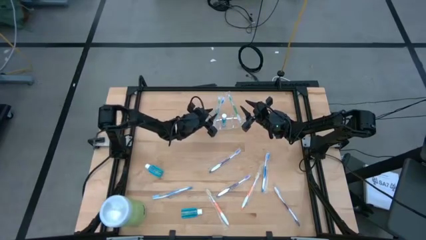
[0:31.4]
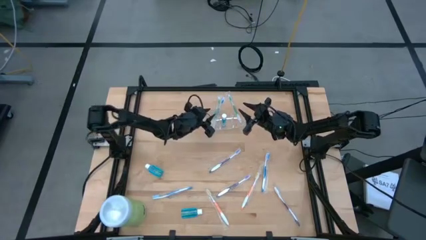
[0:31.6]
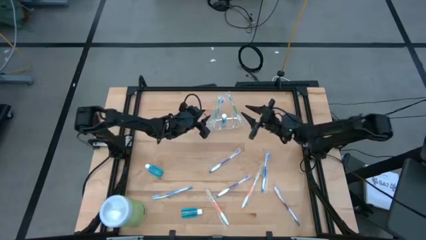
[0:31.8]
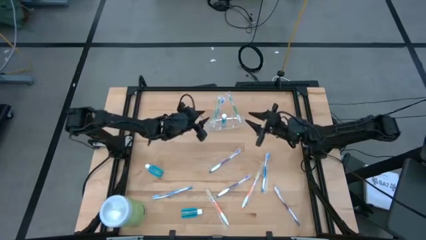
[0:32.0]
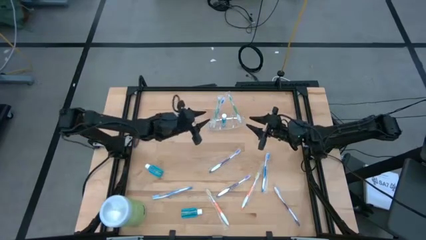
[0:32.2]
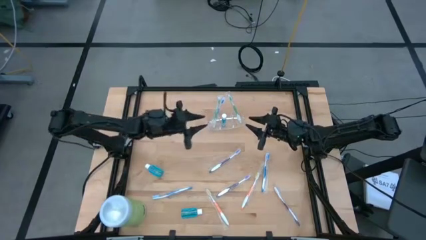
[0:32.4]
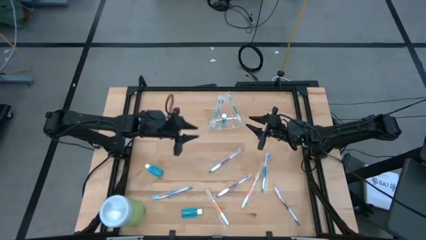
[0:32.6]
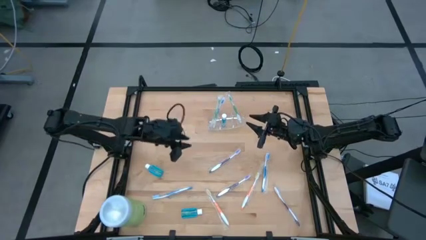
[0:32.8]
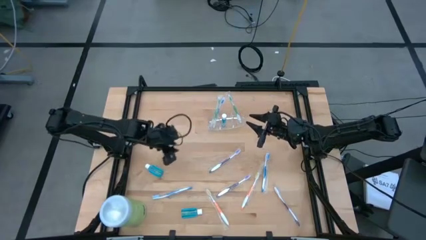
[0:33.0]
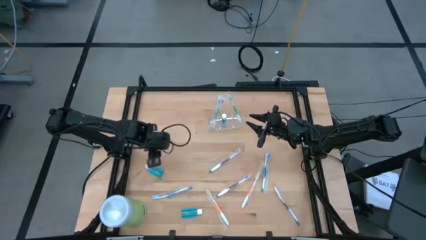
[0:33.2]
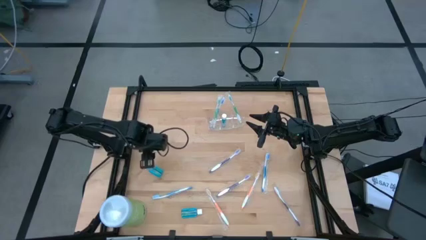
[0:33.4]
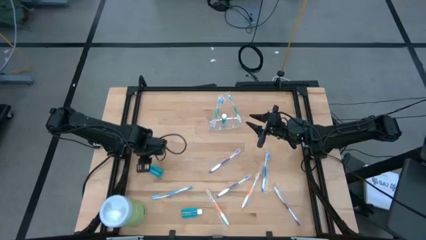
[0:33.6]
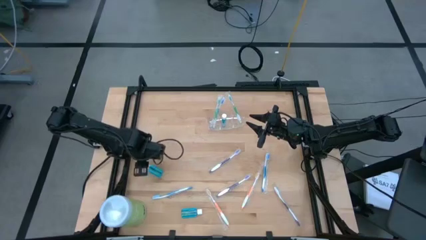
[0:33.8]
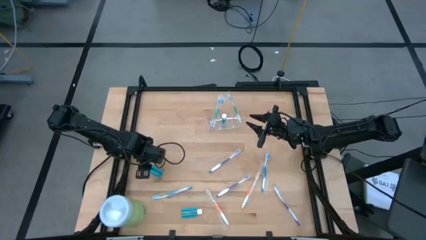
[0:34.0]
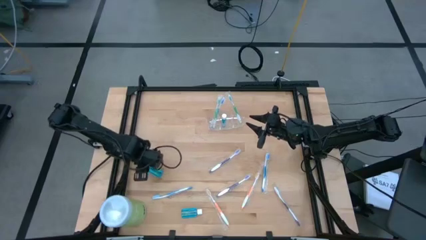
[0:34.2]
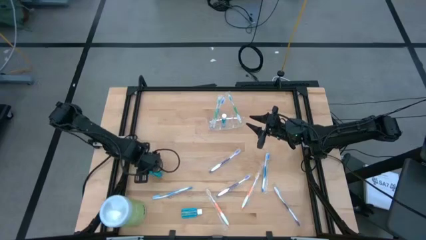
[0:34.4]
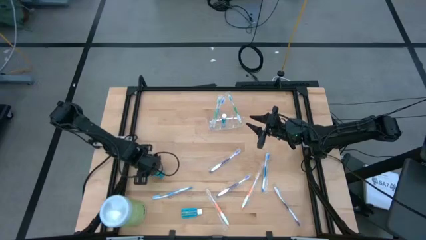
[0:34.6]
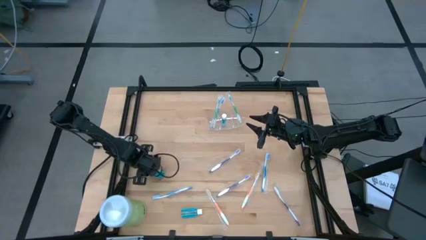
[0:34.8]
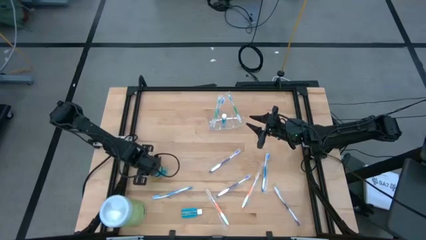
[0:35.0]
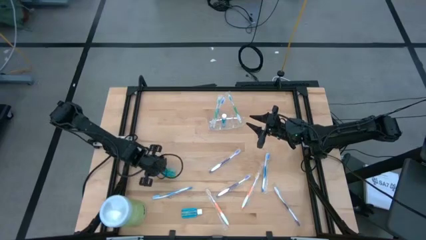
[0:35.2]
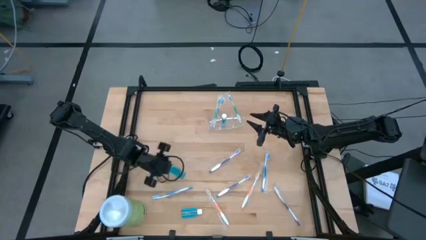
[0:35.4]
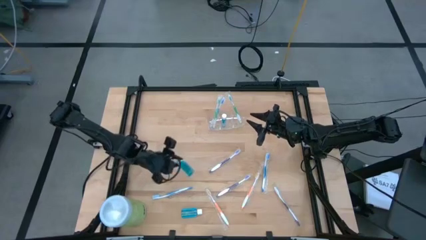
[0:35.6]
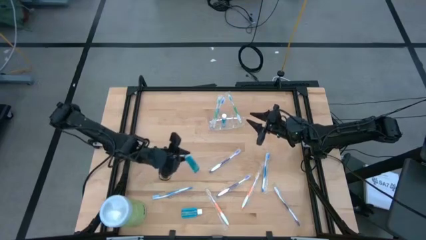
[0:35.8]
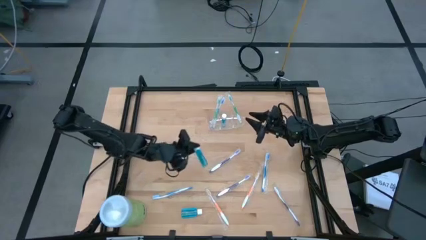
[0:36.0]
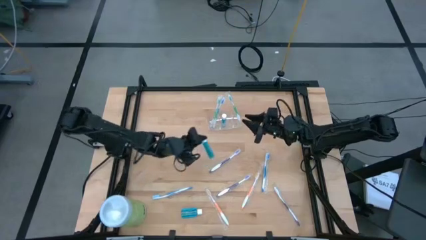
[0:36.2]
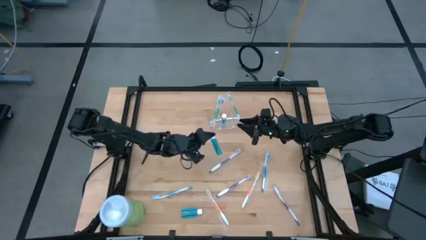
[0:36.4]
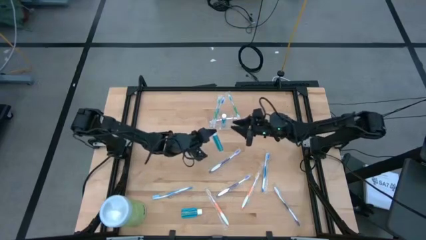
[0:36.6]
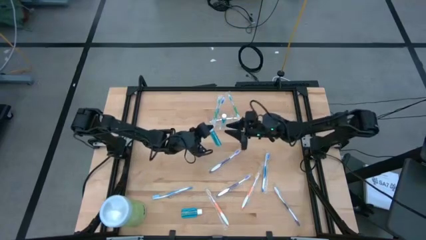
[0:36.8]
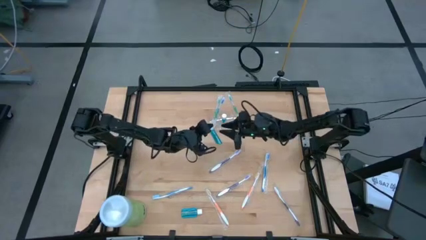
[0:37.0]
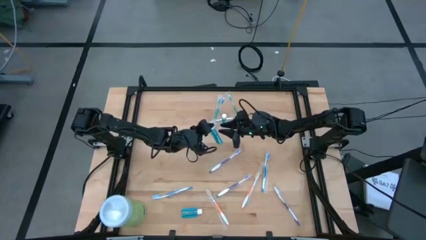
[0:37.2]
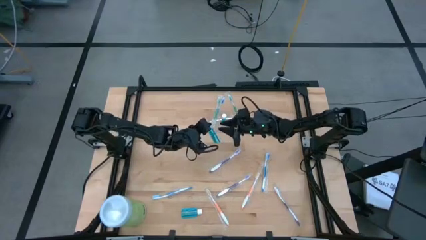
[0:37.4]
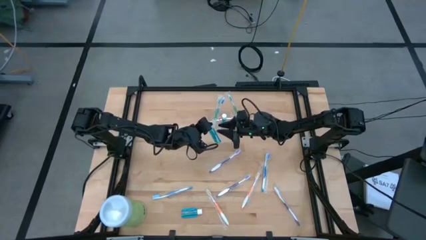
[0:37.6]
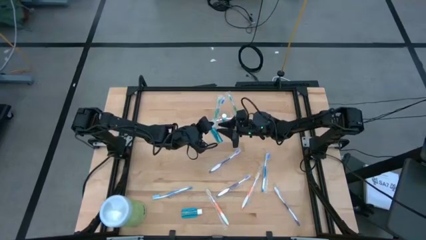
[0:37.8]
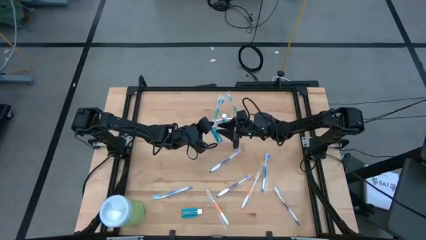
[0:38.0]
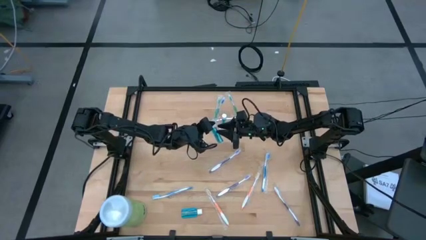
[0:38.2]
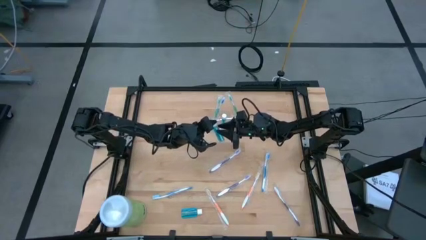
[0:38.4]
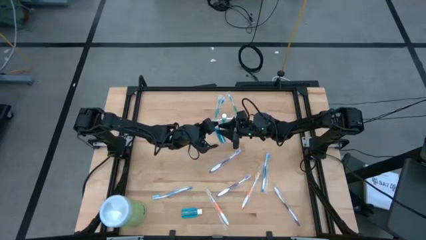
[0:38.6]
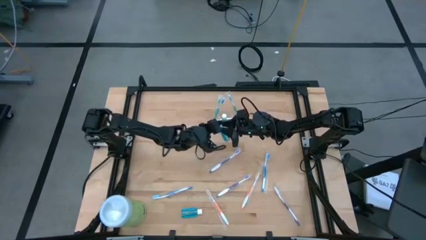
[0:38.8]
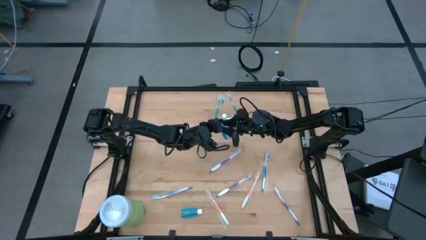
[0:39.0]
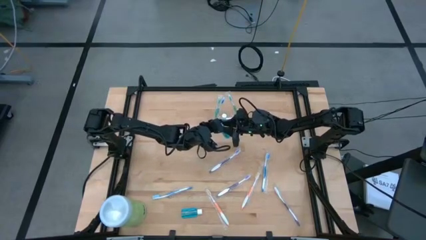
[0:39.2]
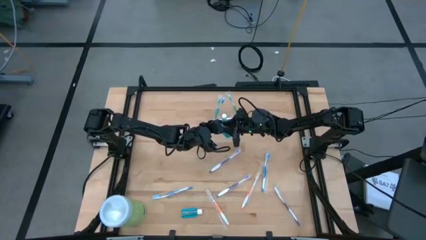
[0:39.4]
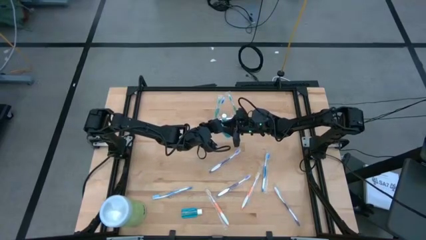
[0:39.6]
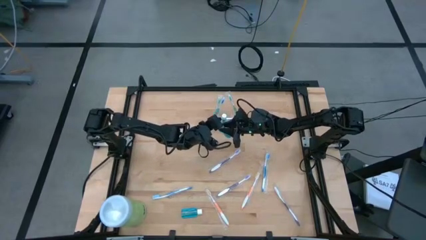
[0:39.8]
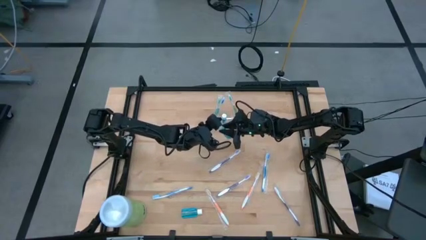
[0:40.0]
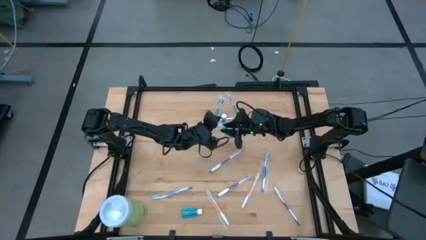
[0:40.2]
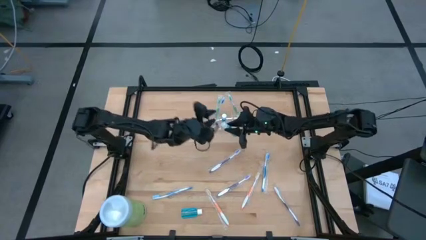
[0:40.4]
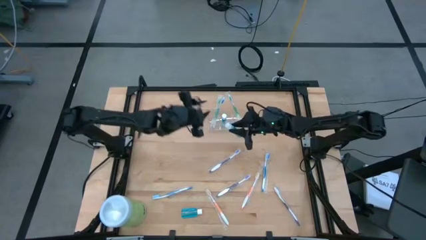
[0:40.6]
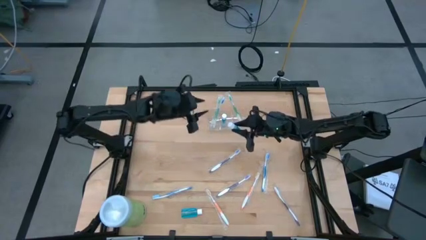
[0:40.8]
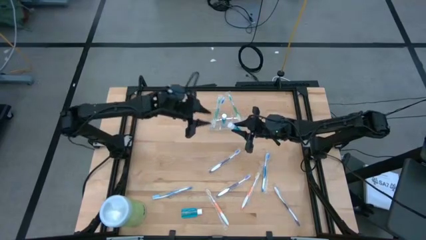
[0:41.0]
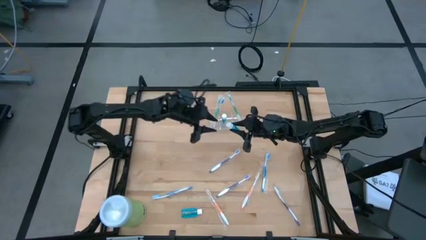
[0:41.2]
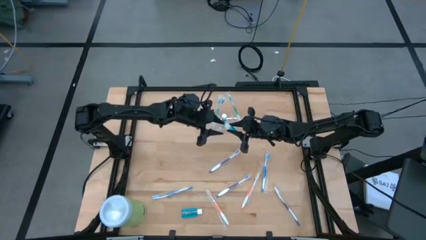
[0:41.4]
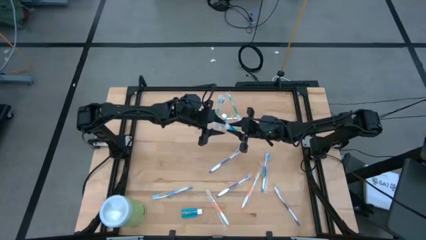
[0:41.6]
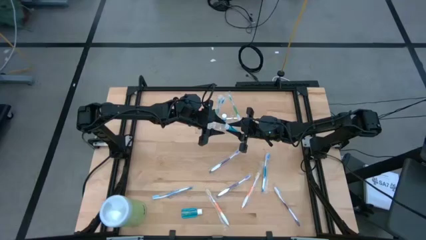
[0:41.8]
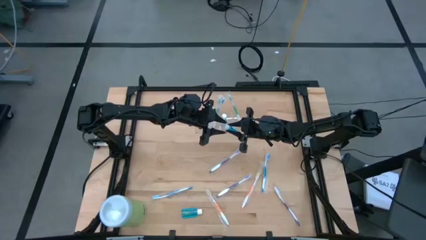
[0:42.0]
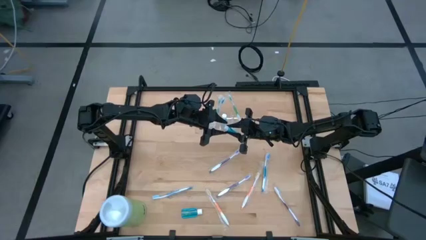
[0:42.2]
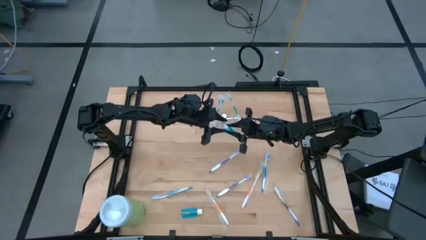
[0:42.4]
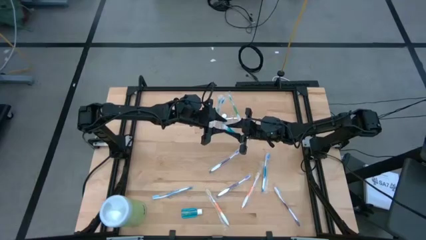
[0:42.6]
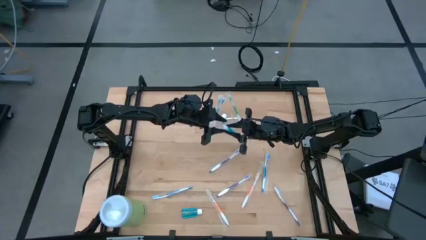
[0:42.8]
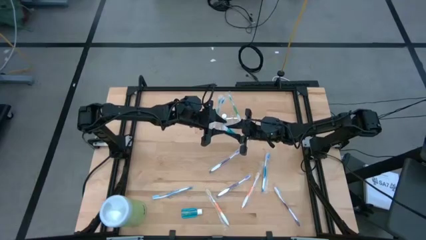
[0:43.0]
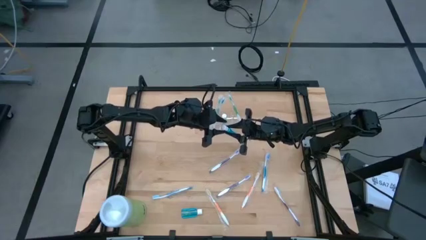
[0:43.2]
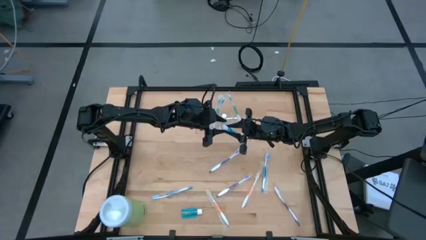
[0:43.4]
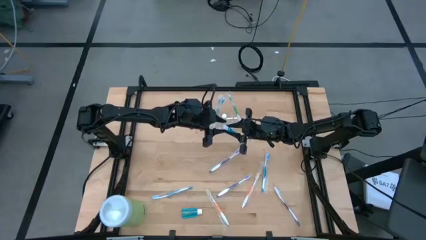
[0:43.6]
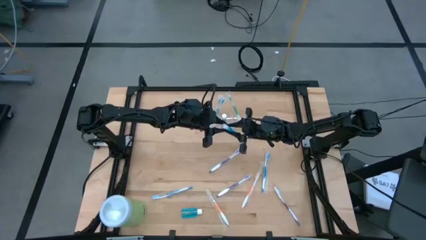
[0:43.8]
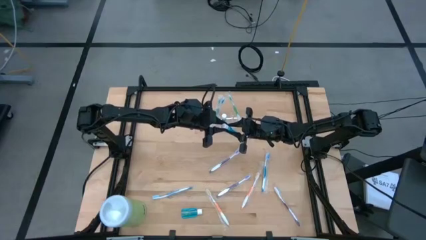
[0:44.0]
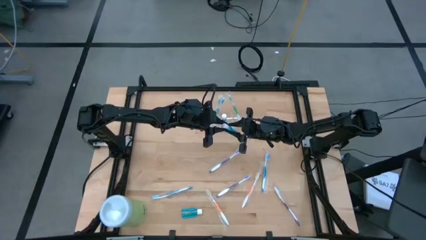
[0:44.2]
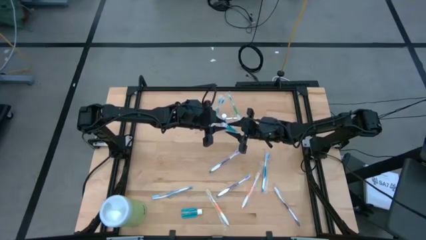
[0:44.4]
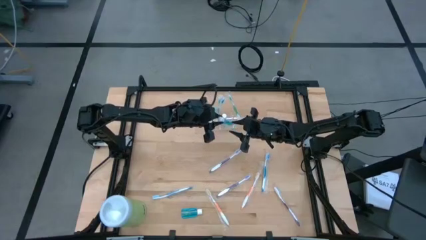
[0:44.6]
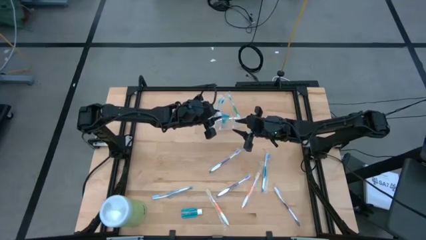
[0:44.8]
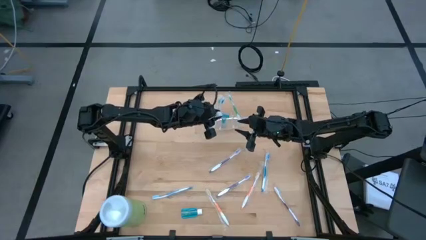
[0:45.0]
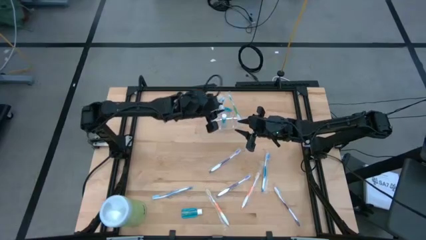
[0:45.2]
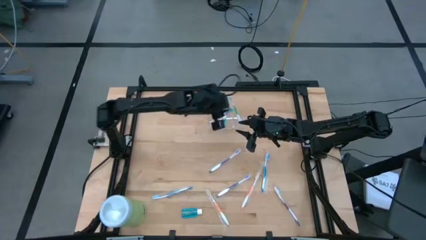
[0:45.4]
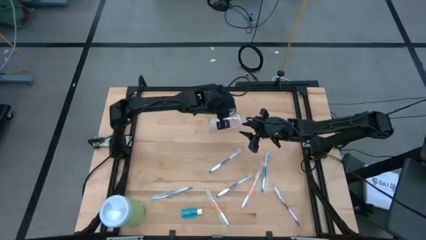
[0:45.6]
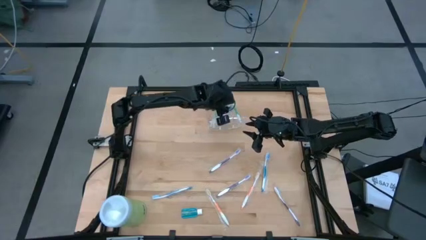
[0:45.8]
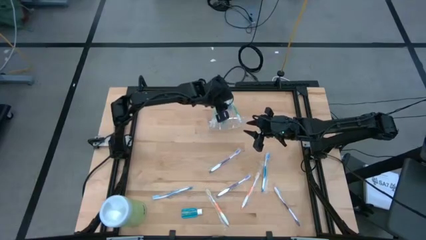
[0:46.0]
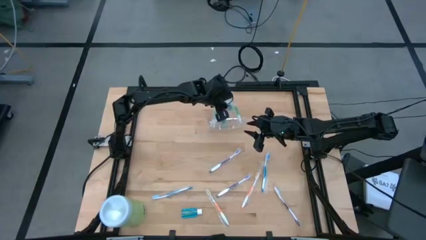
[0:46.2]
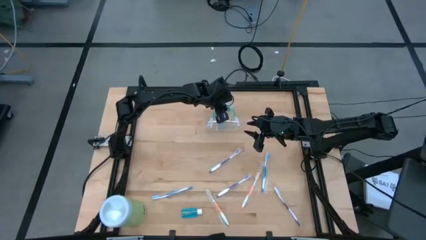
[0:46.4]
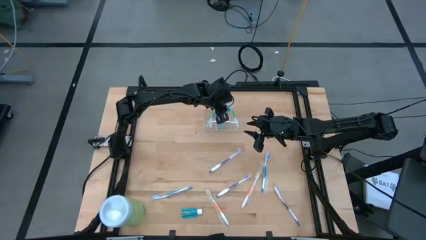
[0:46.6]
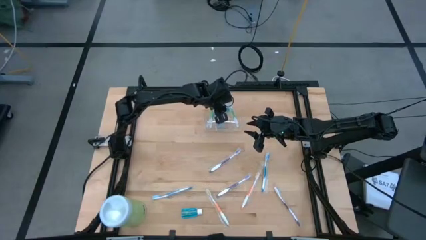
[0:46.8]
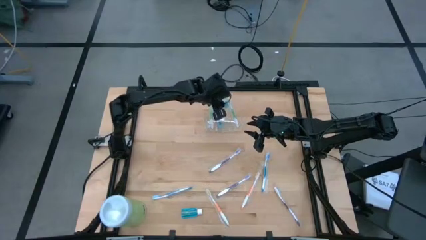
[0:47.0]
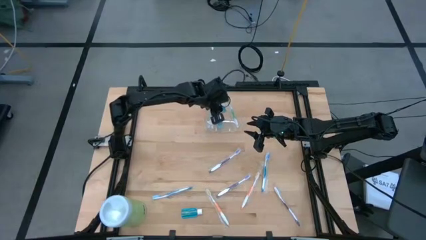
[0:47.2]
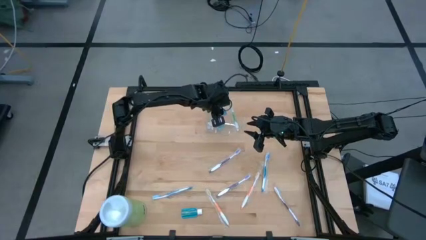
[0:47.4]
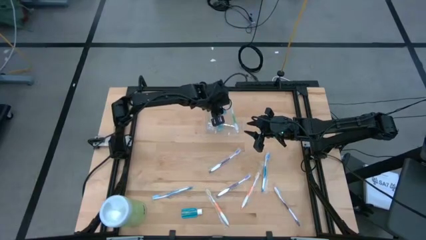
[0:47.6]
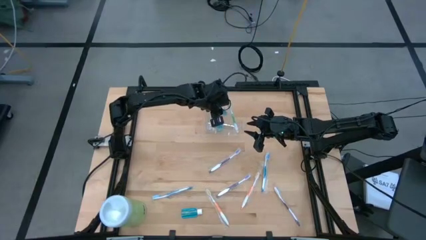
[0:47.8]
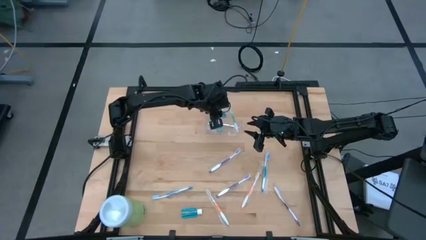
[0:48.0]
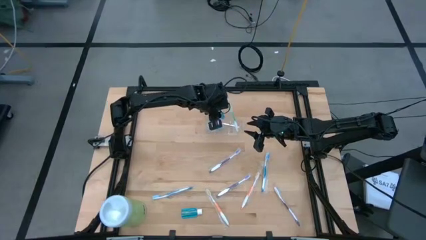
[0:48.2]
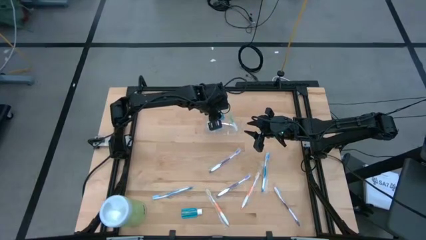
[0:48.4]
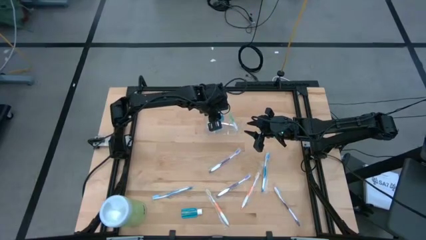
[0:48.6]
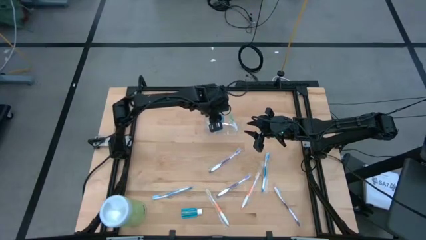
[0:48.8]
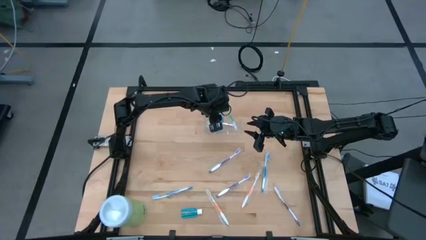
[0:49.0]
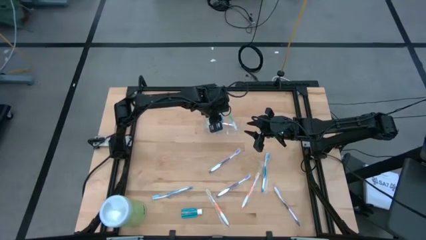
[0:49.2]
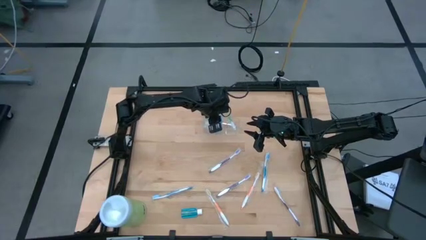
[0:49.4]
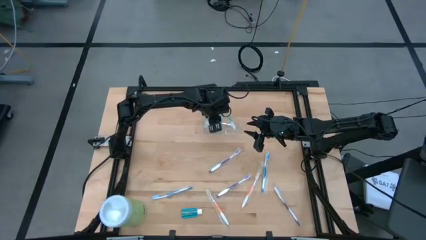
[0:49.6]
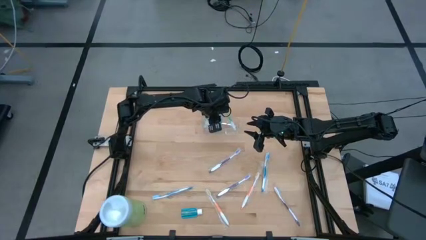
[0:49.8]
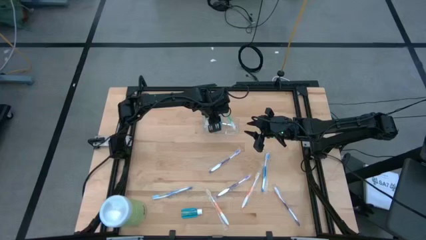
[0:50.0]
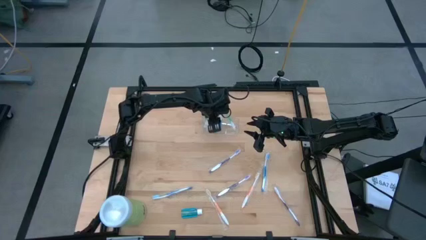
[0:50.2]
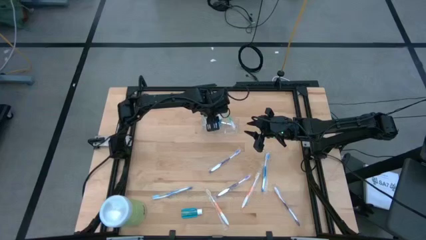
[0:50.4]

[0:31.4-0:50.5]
Task: Pick & Place toothbrushing station
Put the top mouthwash into the middle section of the transparent organizer
